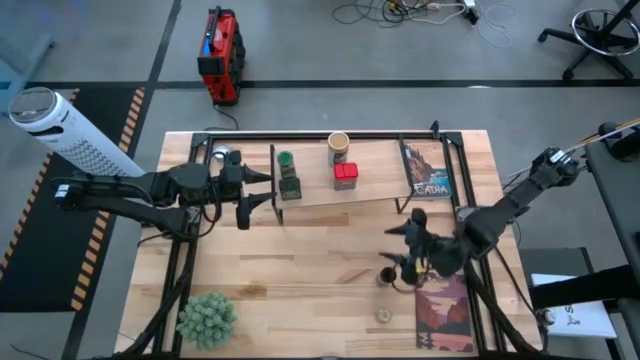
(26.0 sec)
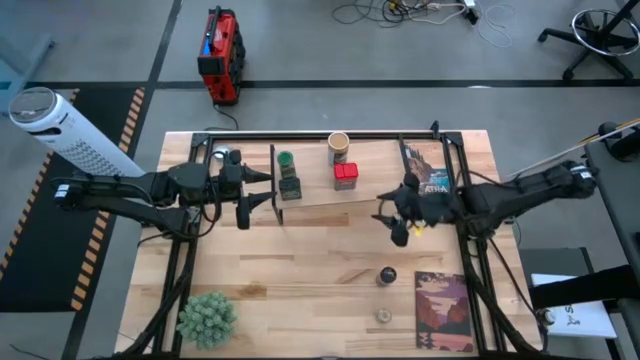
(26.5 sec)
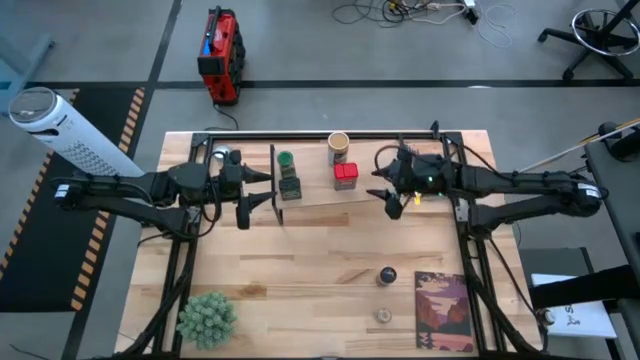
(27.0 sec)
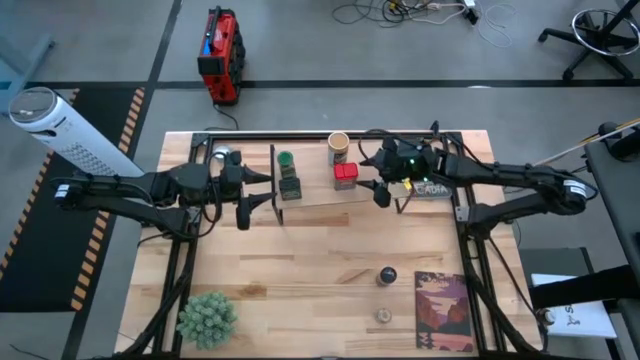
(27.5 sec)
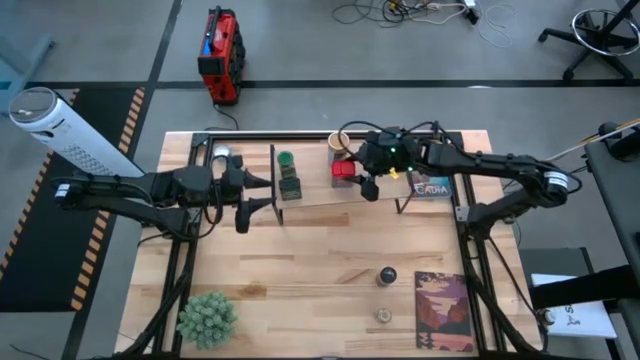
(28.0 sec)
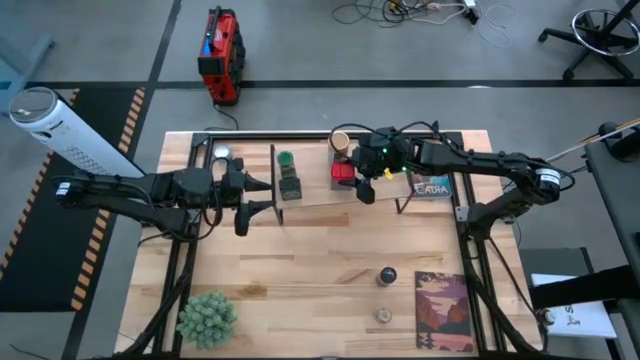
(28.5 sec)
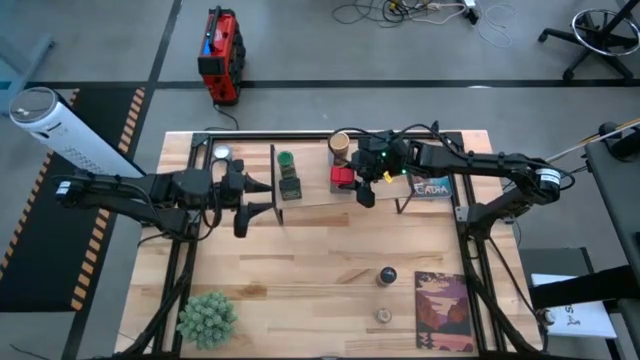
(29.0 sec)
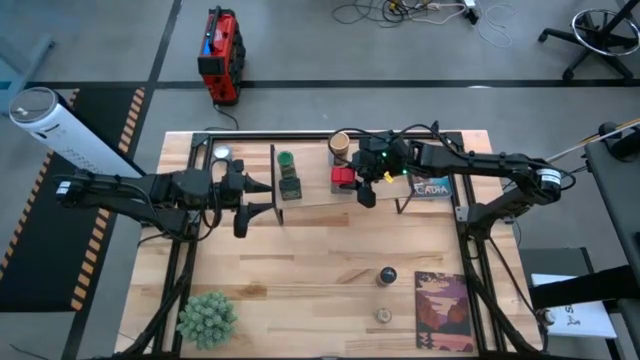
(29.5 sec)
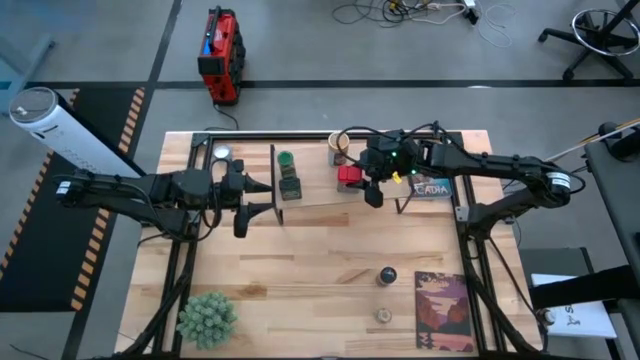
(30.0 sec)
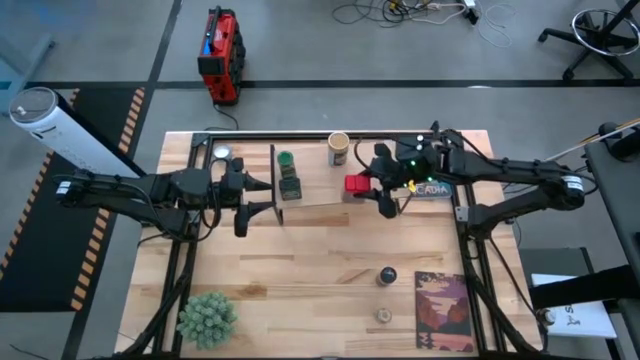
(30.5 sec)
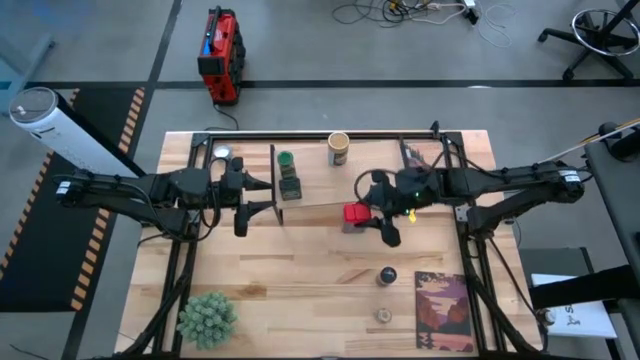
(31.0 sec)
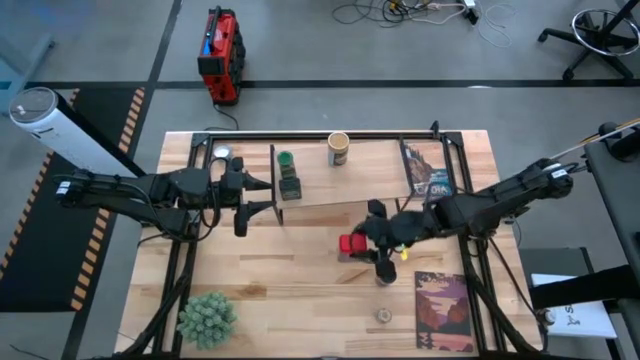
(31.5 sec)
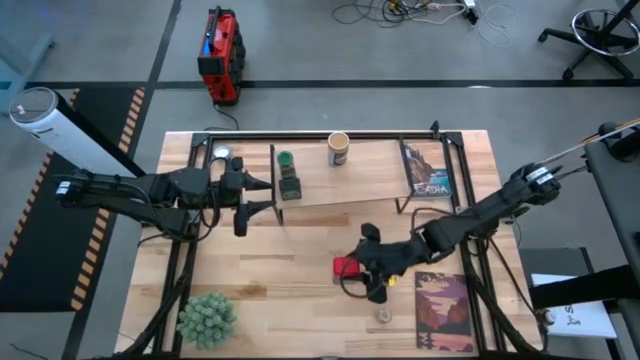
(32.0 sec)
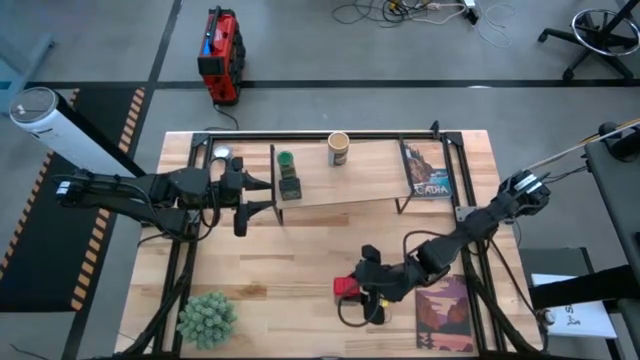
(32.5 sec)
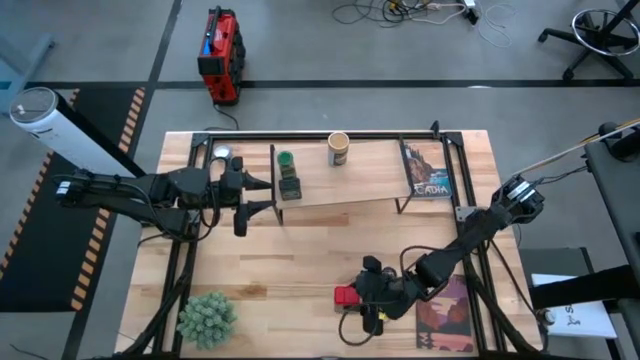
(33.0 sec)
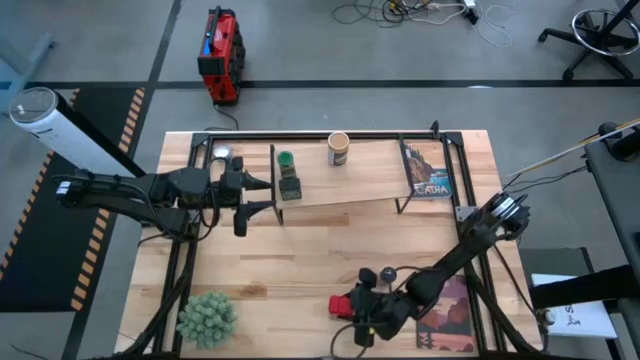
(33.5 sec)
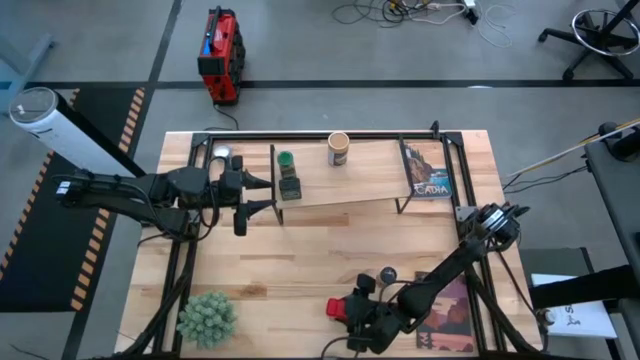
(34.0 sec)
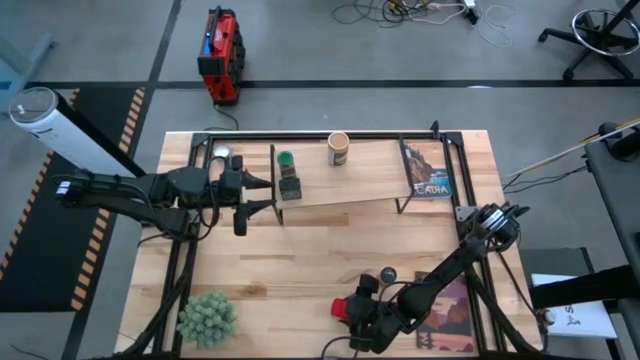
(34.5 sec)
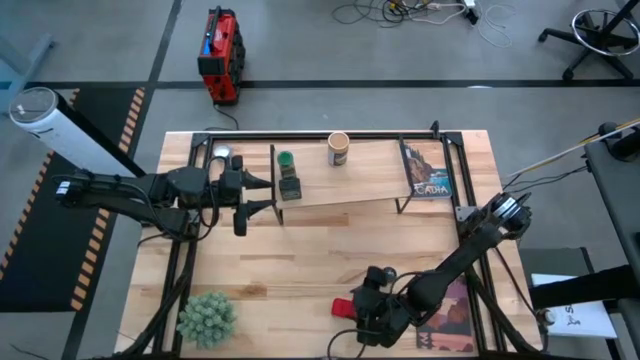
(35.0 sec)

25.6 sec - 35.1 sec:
Task: Shelf spices
Remove the red seasoning can from the shelf

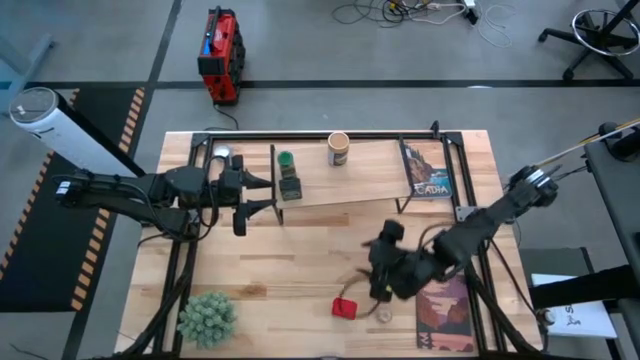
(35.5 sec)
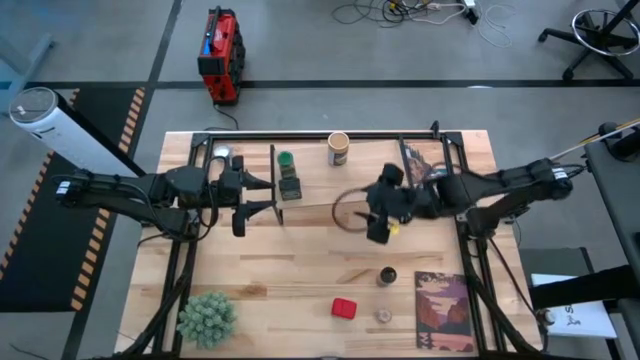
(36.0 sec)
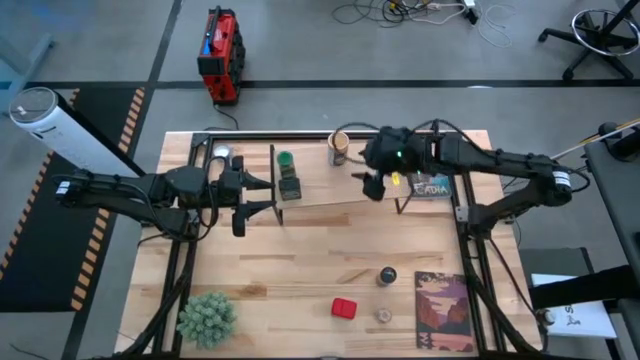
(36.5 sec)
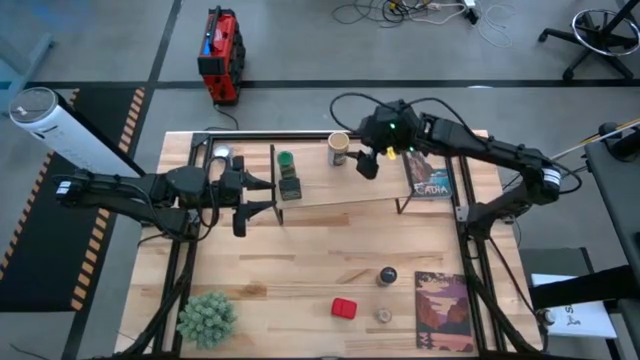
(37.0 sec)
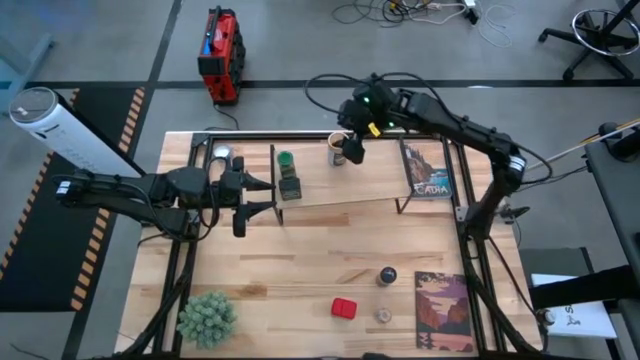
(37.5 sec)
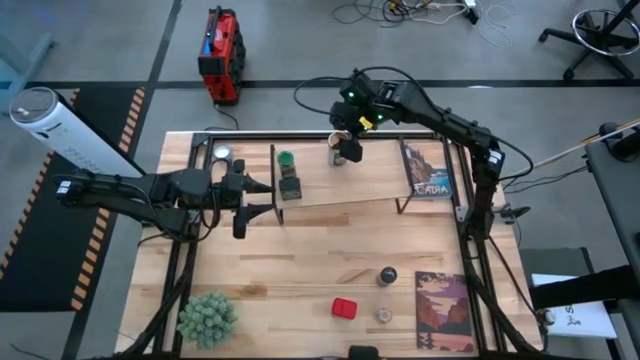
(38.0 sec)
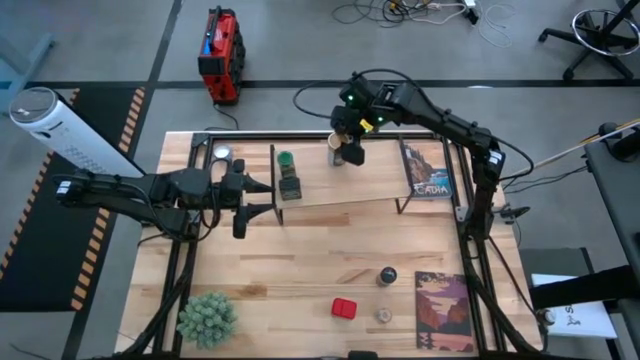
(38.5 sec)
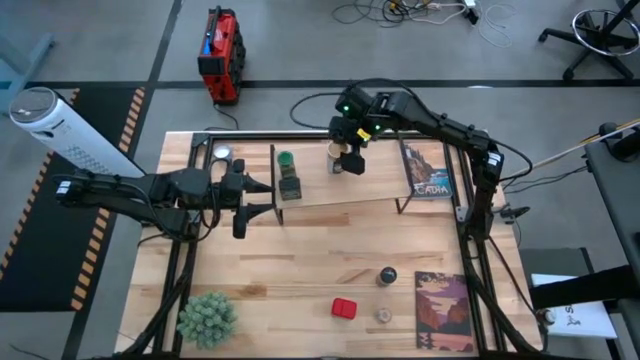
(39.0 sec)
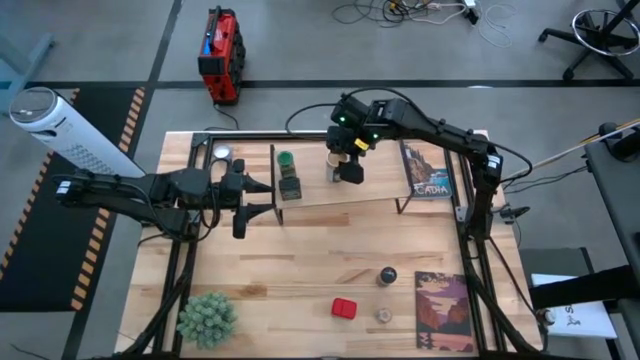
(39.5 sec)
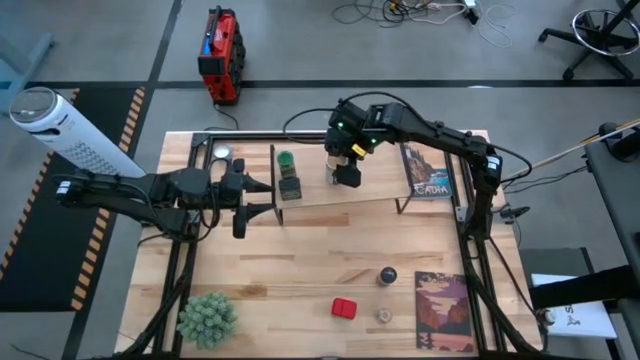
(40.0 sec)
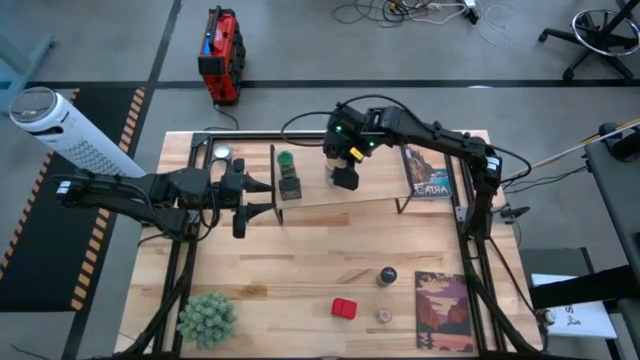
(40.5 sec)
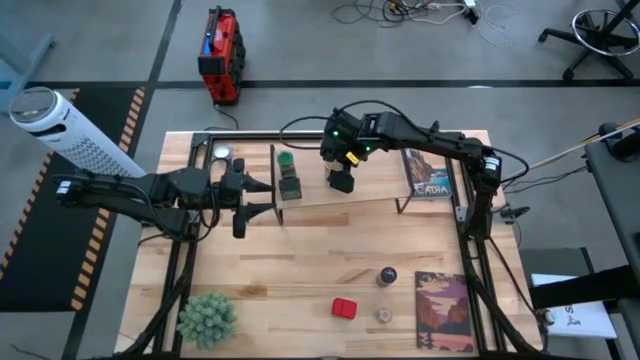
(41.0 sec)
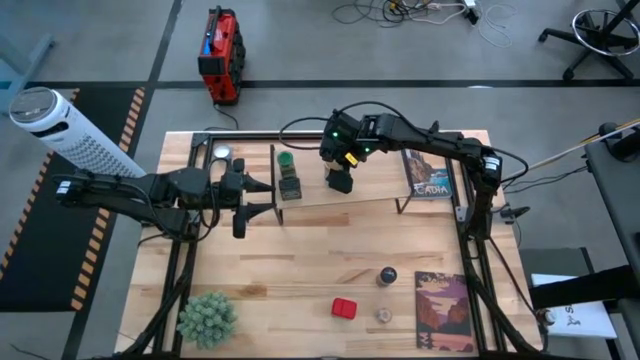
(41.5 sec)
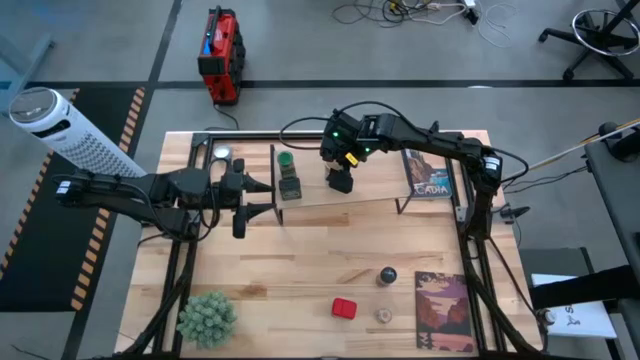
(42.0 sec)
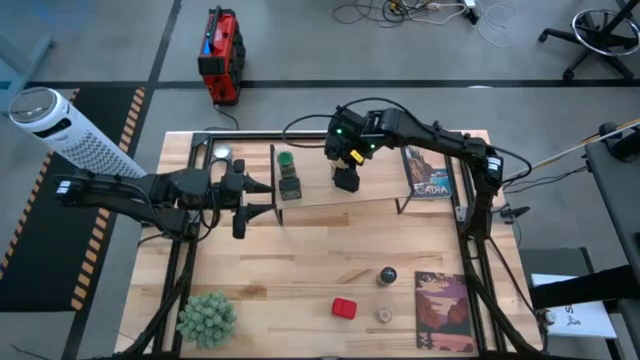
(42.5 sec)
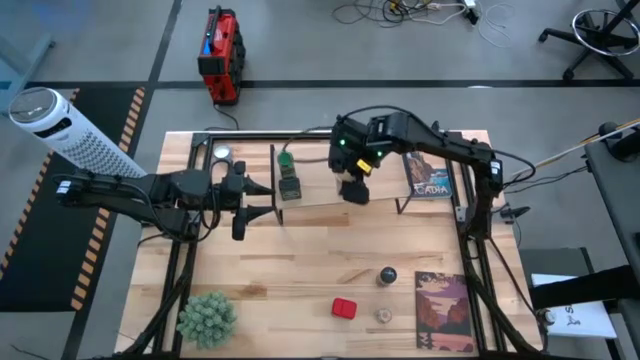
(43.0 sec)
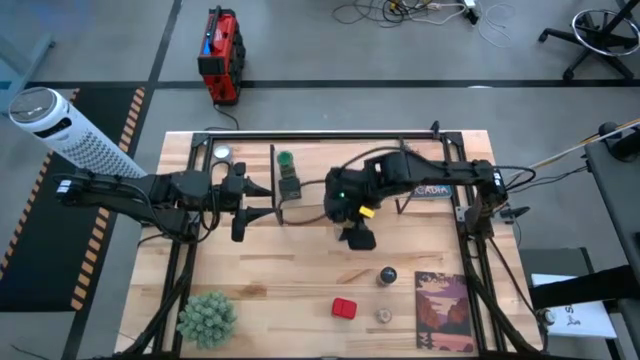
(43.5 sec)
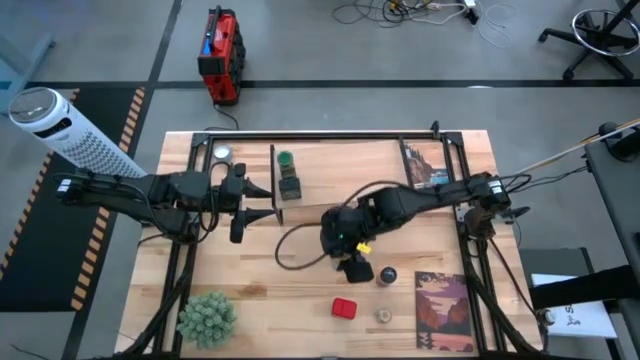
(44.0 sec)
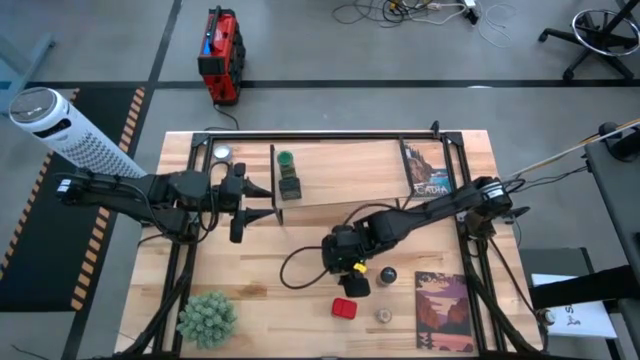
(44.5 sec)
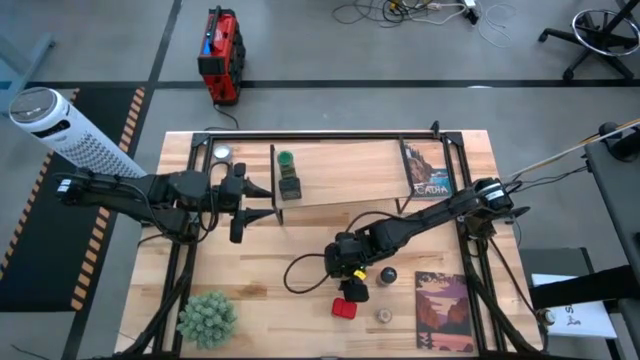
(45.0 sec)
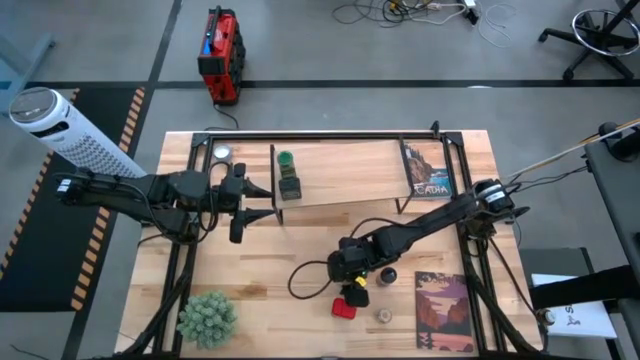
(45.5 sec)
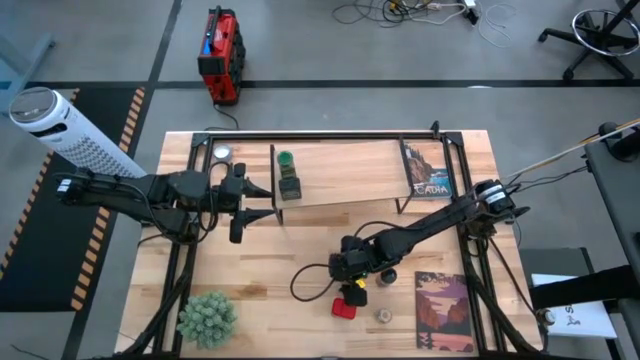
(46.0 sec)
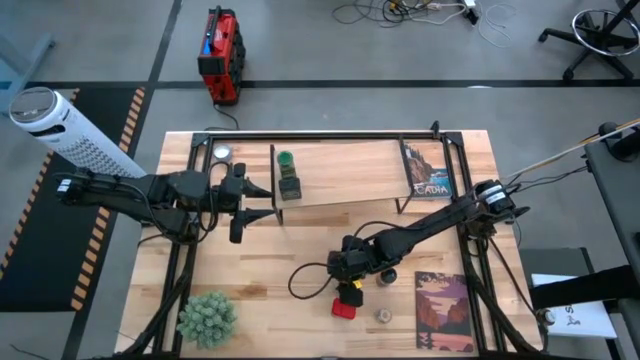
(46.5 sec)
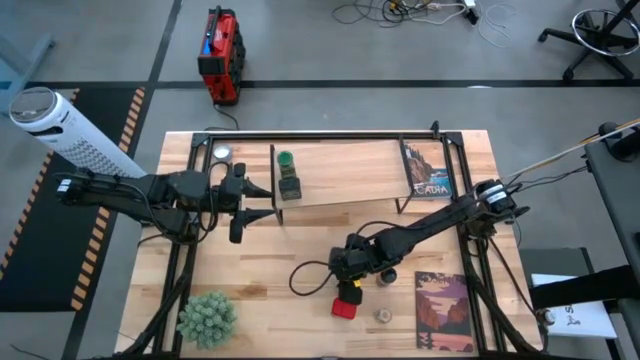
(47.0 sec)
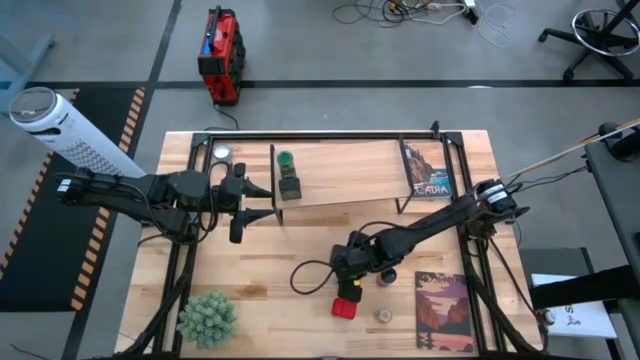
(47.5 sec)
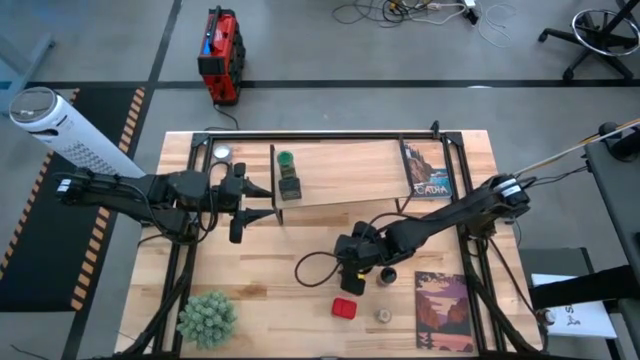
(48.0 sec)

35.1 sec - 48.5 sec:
Remove the gold seasoning bottle from the shelf
